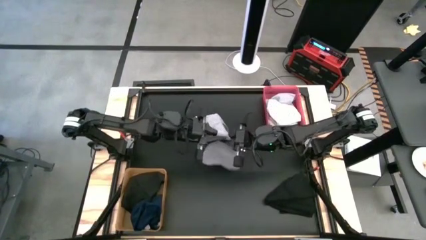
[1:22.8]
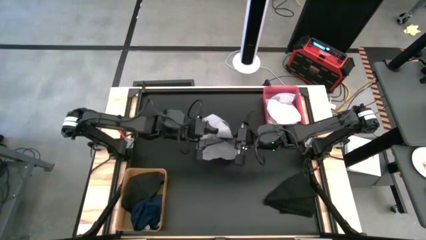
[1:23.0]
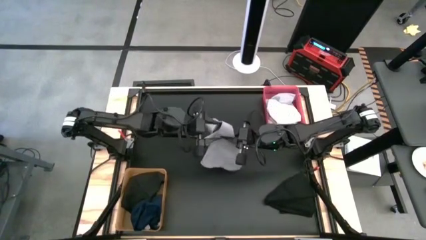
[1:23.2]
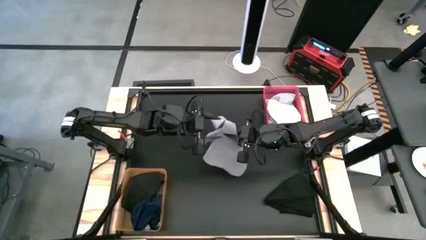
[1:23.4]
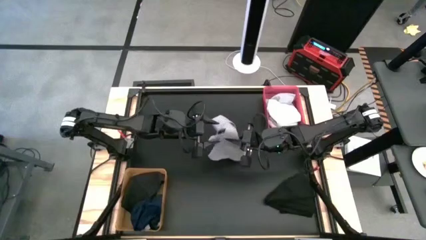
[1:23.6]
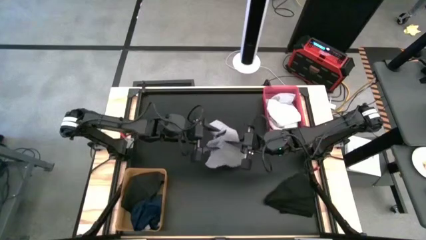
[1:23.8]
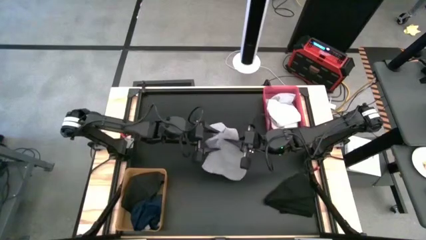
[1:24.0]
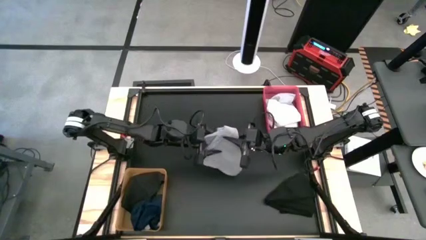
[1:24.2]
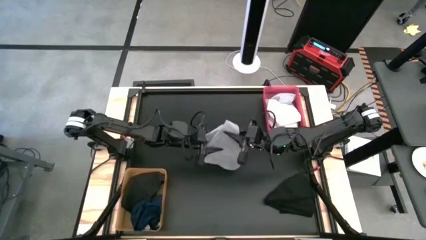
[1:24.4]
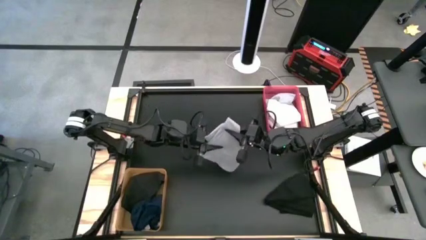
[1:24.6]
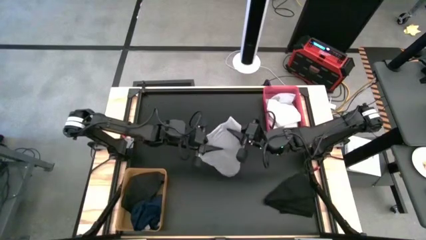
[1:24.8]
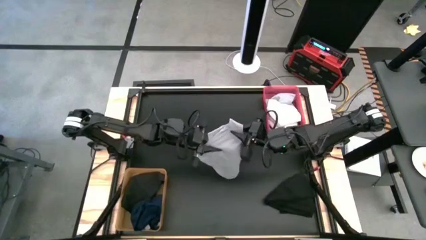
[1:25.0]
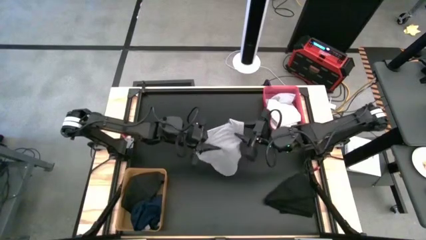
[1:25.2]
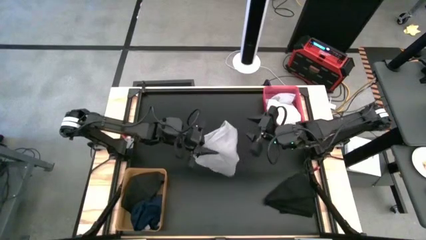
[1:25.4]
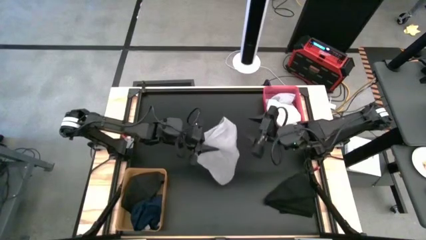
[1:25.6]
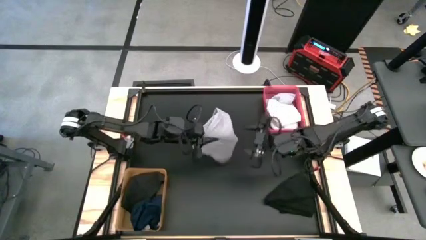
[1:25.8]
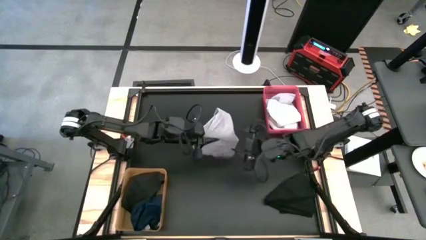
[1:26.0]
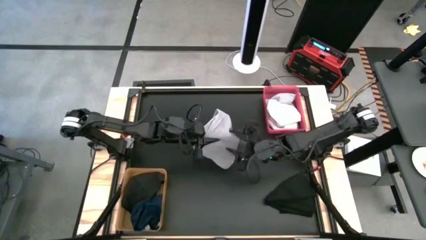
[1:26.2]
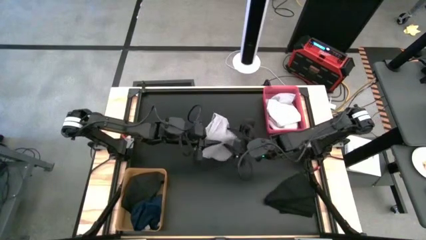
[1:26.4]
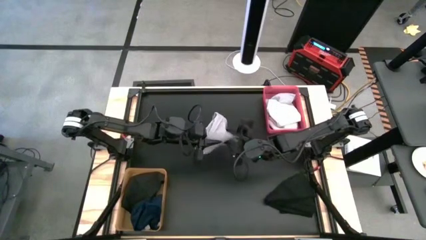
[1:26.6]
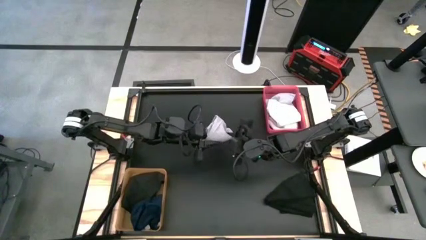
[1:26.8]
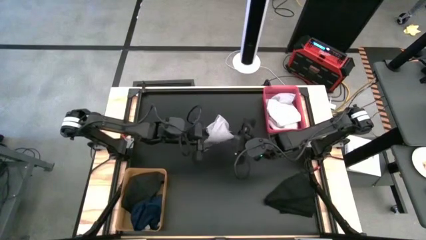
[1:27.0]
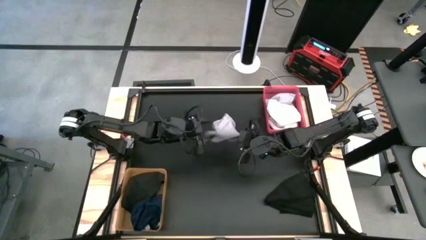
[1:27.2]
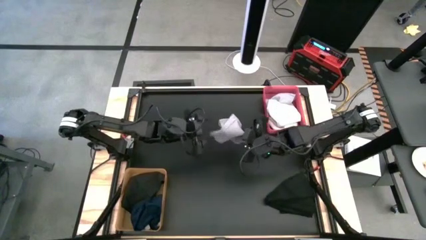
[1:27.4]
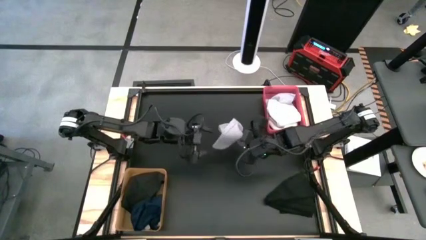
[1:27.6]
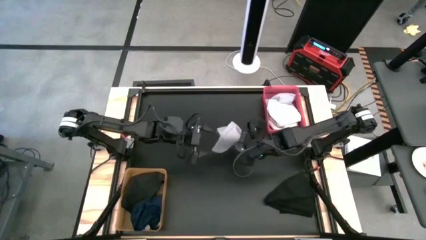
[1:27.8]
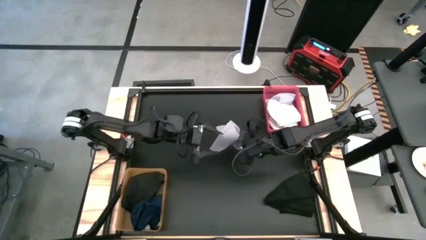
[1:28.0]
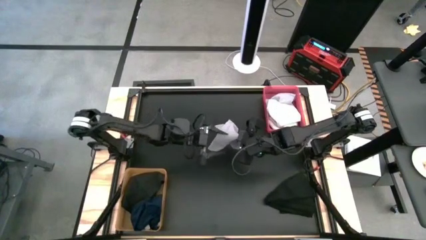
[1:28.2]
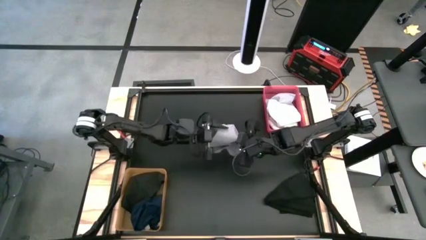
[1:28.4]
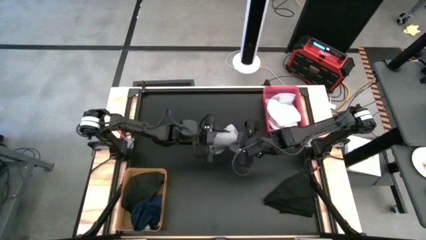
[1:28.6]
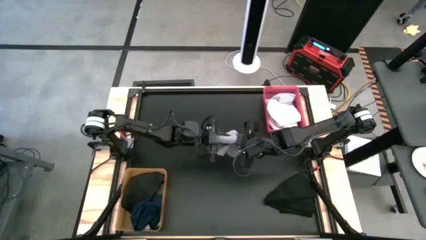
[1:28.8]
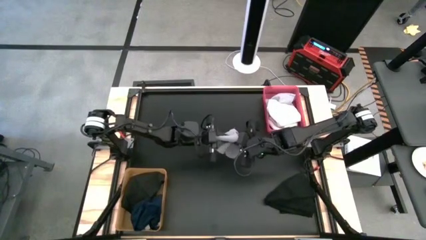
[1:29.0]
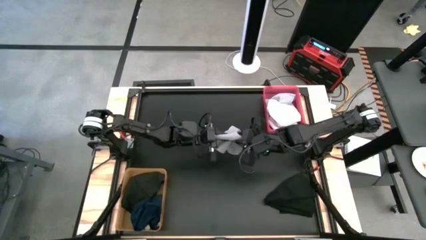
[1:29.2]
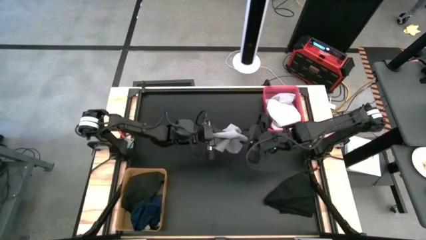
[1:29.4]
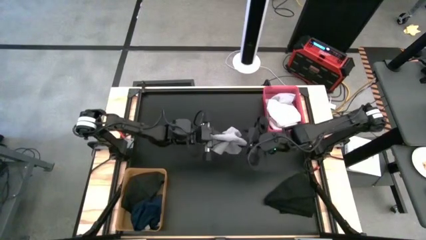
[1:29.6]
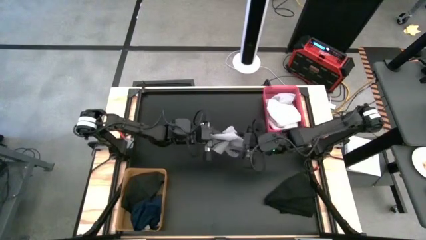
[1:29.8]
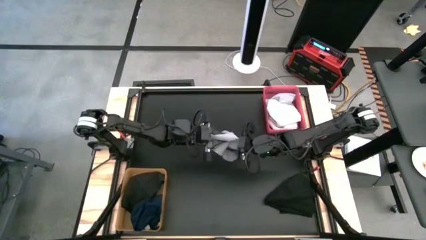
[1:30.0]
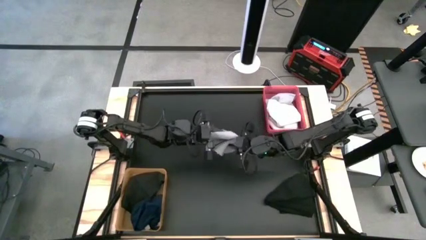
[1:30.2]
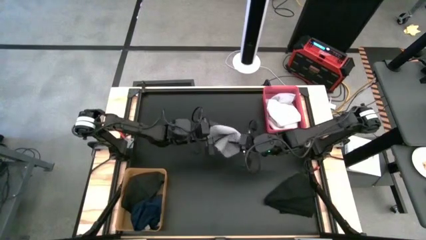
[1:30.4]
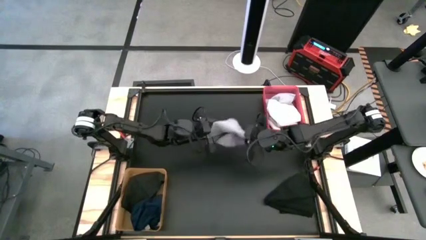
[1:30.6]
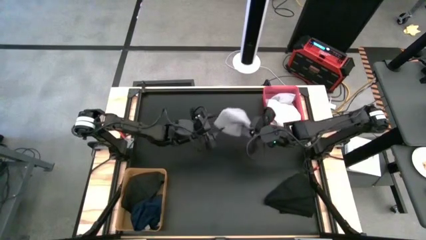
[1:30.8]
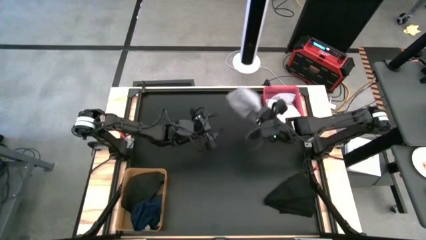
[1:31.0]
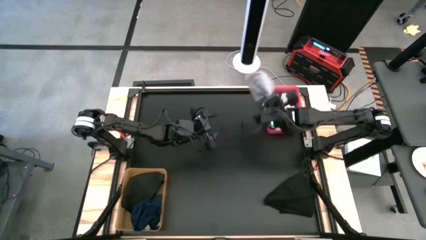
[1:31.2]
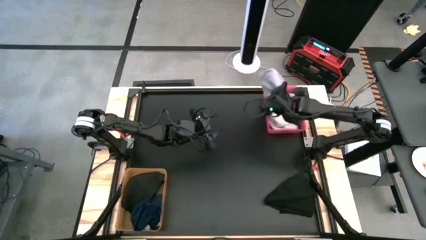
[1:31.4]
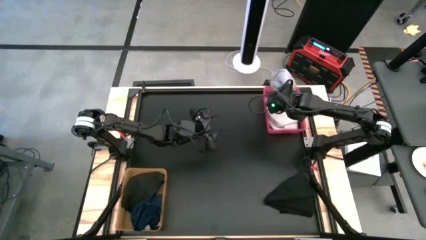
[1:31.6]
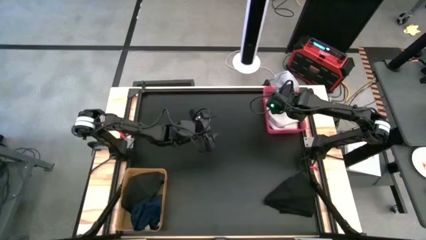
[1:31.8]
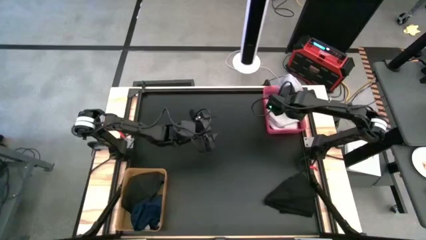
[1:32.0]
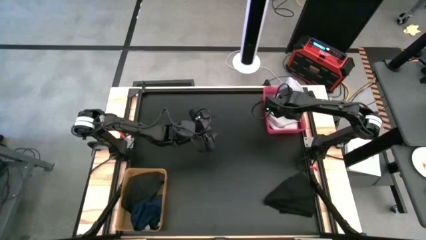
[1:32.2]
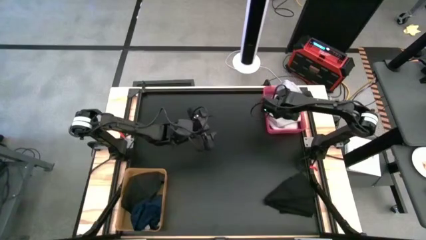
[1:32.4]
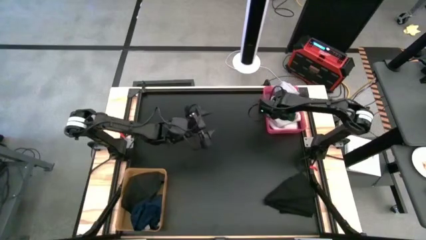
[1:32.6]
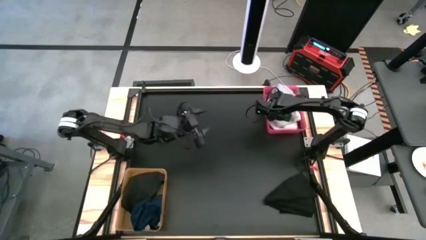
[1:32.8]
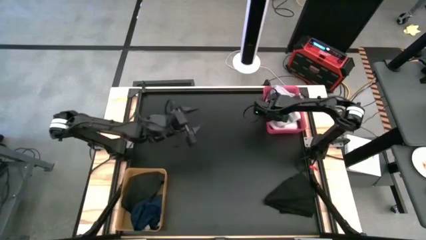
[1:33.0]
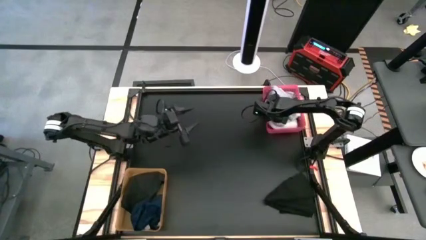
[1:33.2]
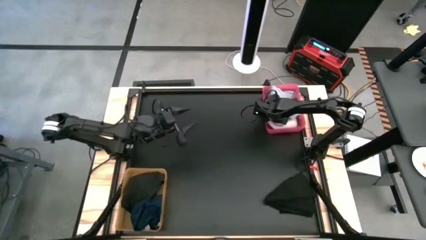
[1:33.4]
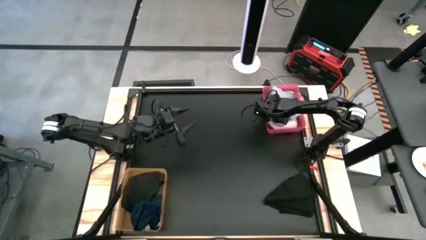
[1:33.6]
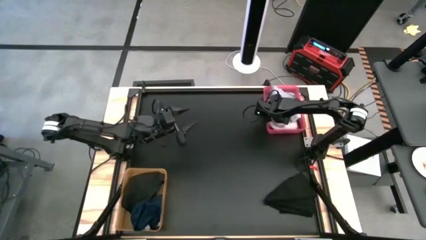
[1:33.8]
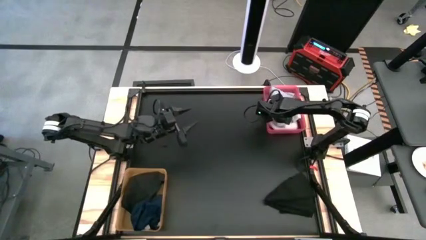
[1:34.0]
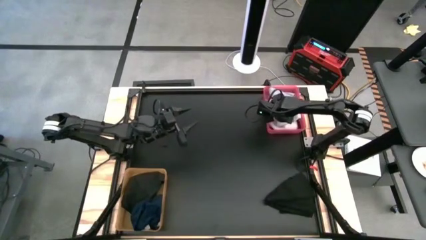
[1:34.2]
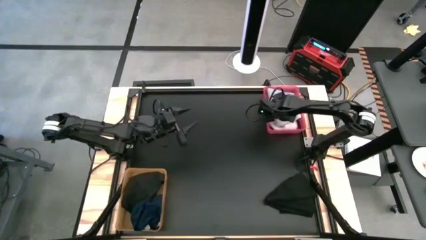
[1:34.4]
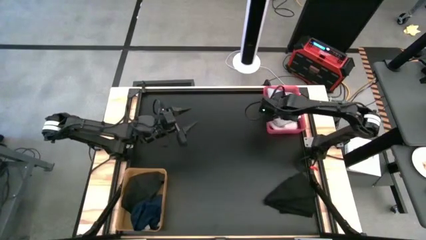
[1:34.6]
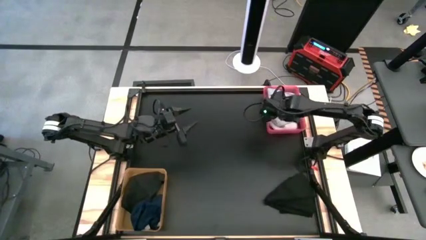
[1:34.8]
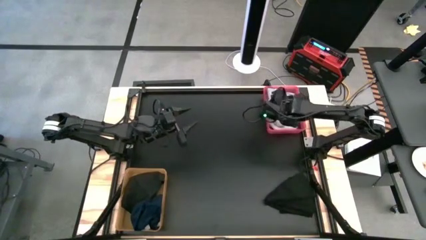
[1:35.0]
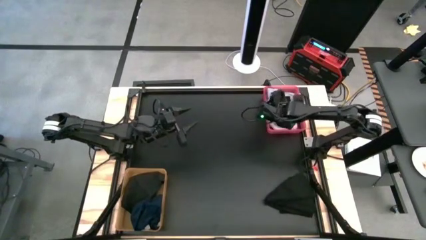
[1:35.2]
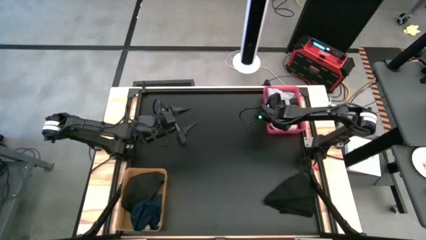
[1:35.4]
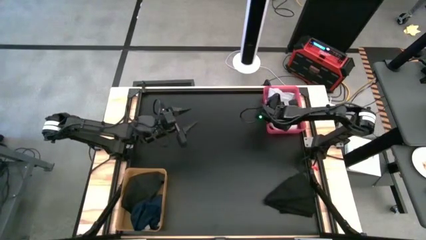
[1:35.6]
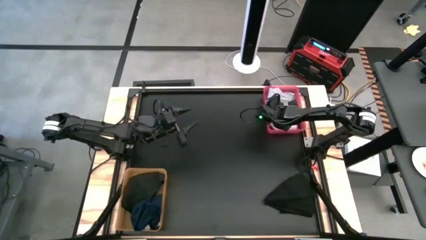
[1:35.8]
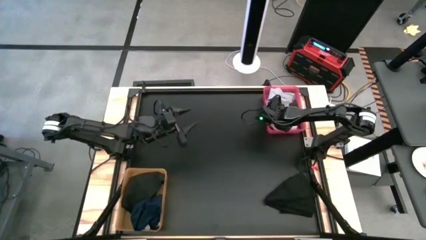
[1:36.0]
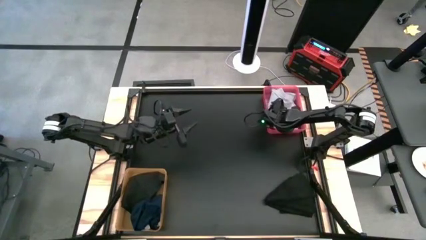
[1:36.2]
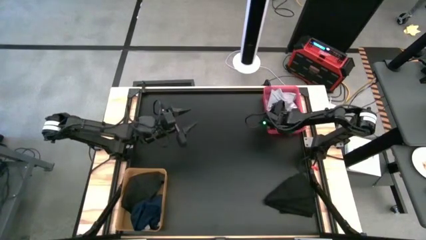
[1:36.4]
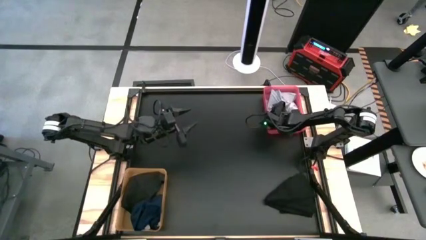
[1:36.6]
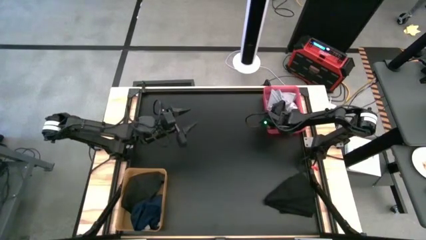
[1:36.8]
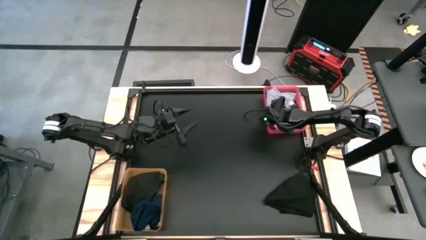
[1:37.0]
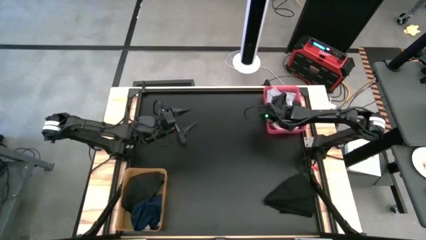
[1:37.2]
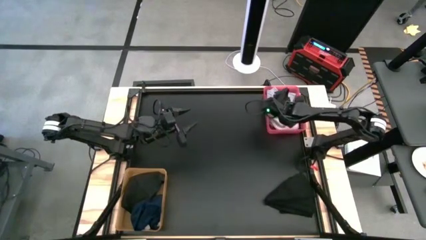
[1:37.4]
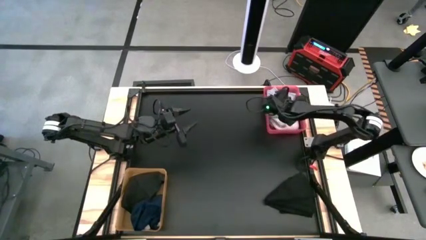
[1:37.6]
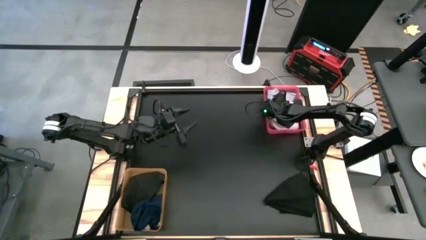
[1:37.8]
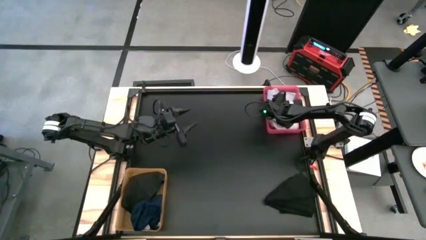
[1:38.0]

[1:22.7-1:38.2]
Task: Sort towels by color in basket
Put the gray microfiber towel into the pink bin
